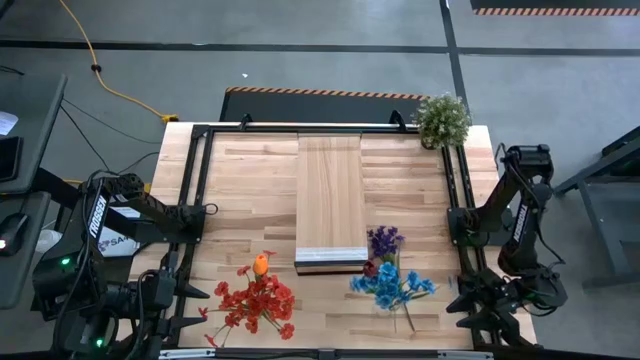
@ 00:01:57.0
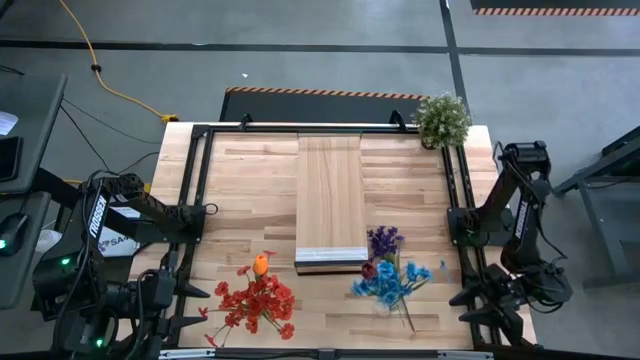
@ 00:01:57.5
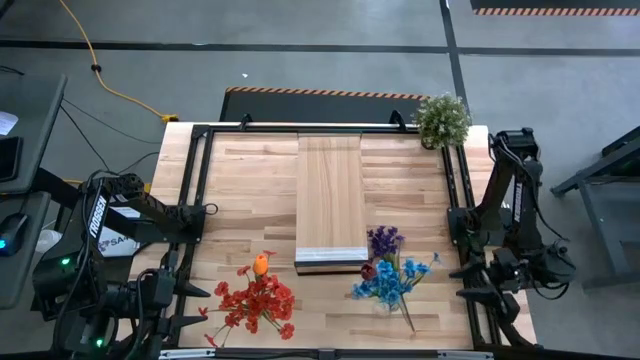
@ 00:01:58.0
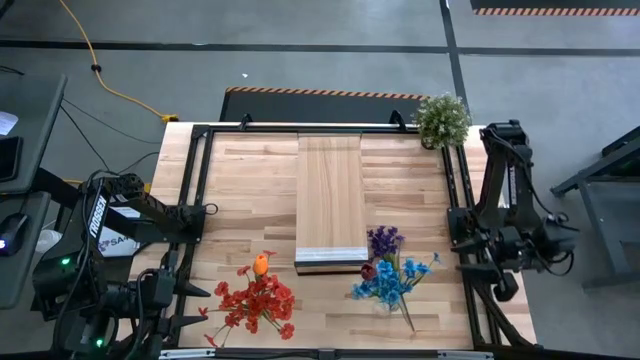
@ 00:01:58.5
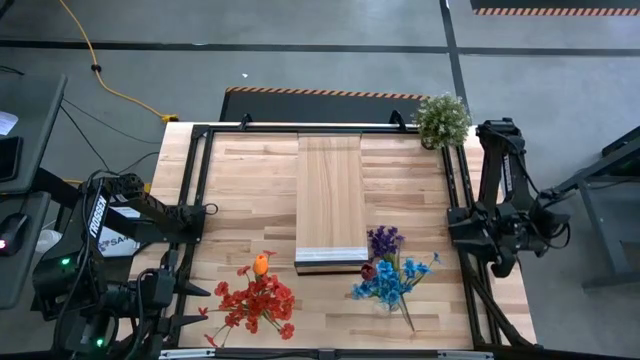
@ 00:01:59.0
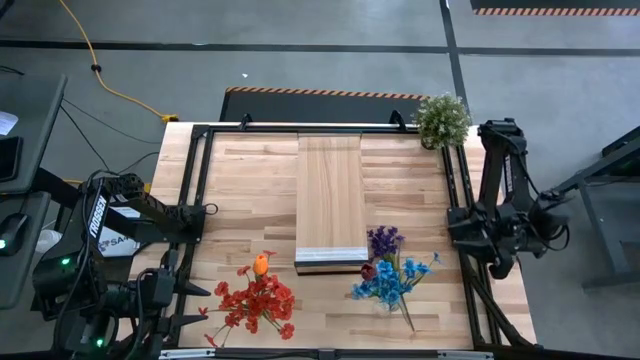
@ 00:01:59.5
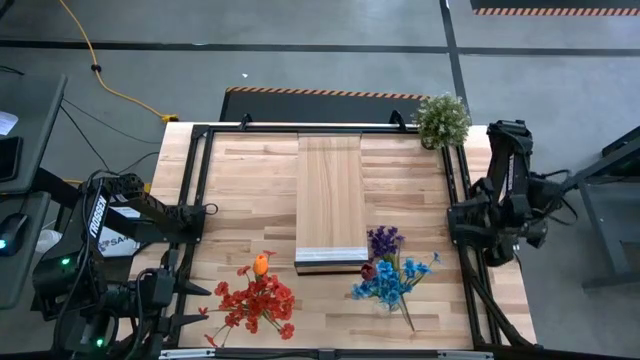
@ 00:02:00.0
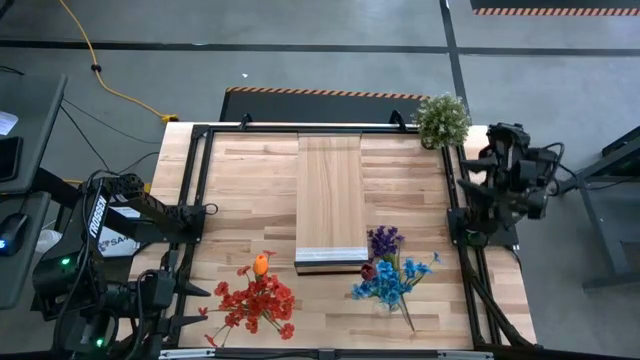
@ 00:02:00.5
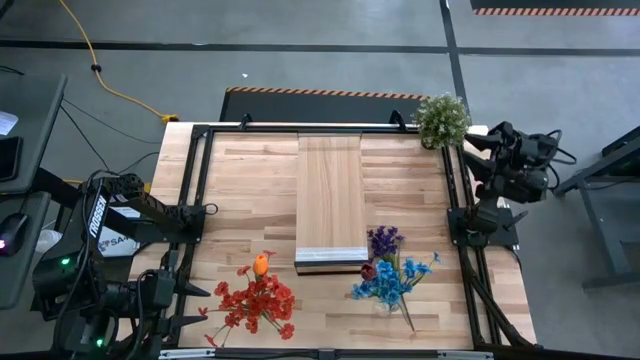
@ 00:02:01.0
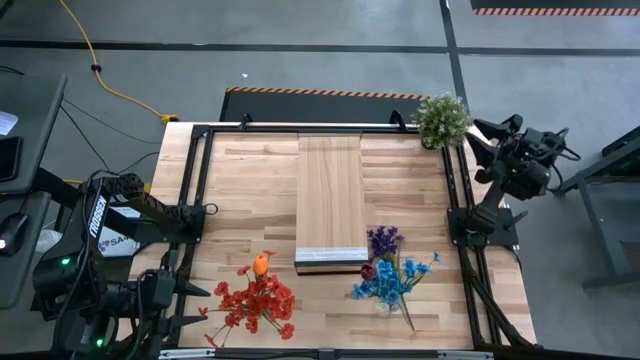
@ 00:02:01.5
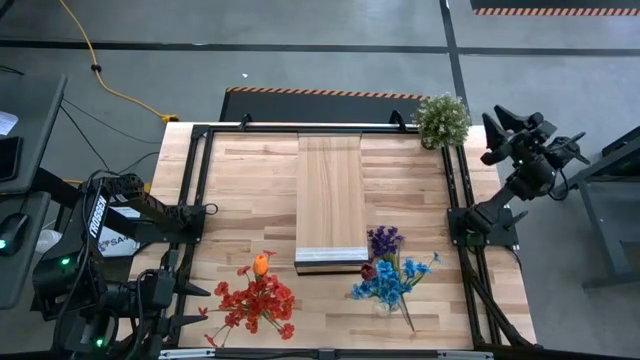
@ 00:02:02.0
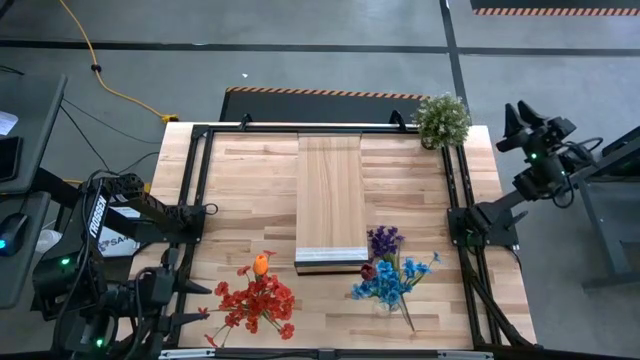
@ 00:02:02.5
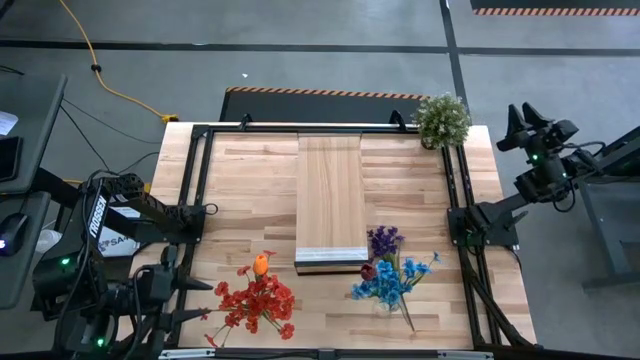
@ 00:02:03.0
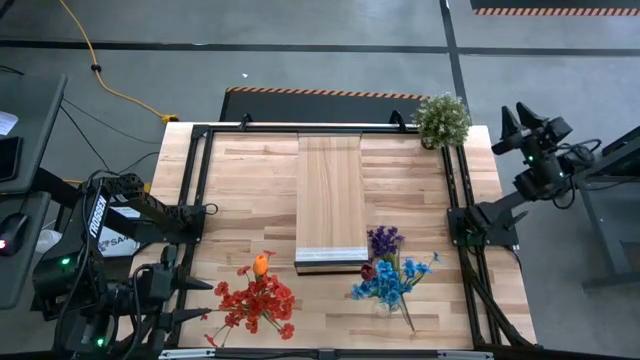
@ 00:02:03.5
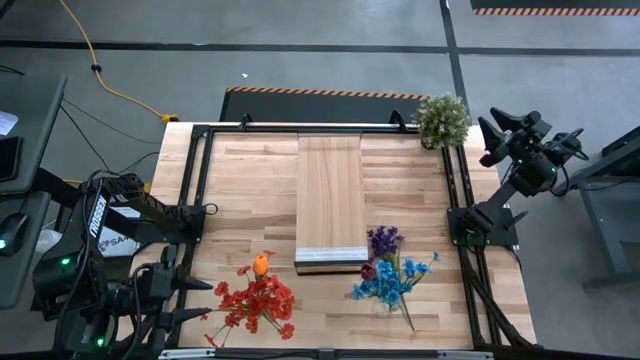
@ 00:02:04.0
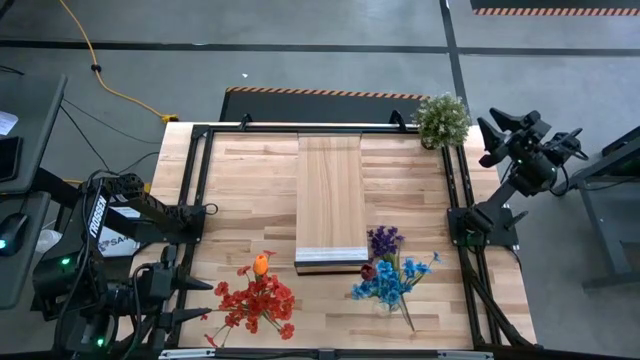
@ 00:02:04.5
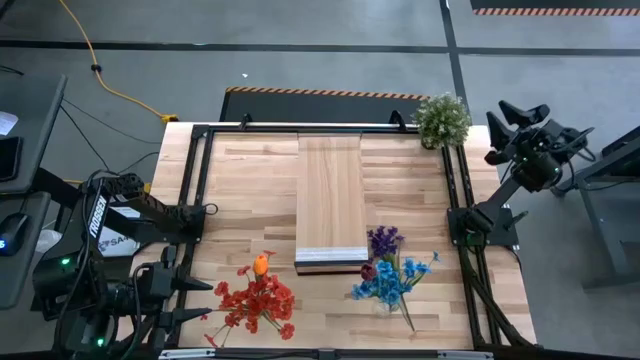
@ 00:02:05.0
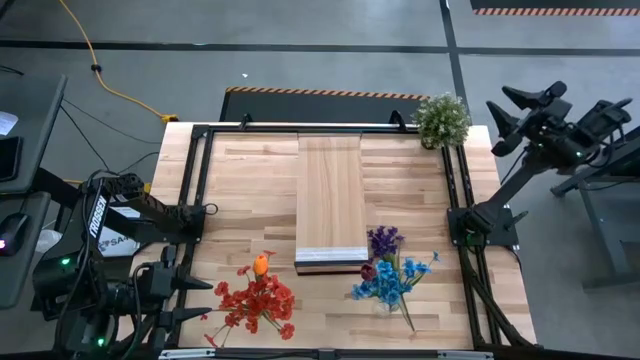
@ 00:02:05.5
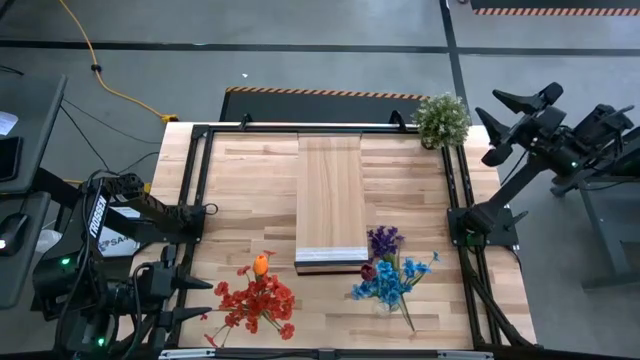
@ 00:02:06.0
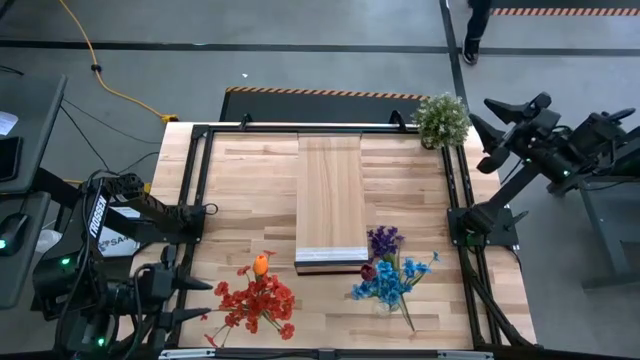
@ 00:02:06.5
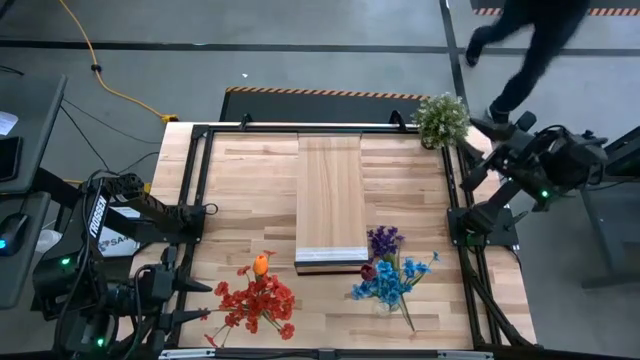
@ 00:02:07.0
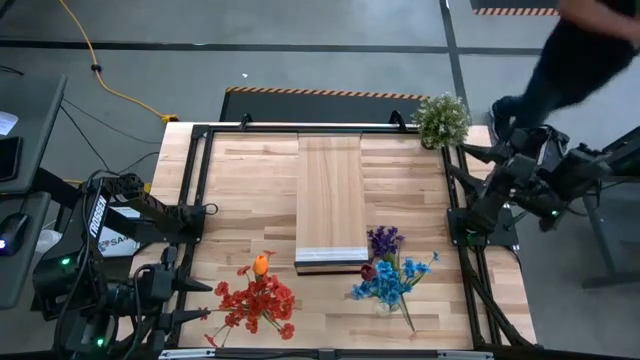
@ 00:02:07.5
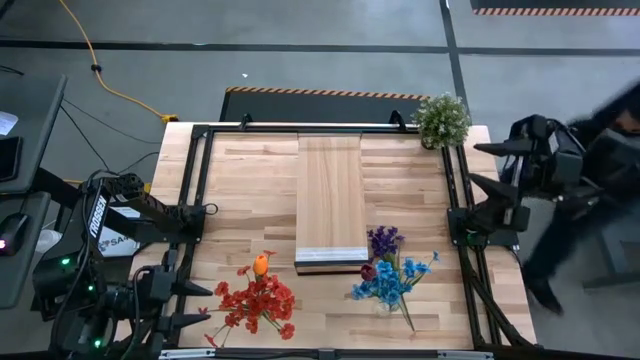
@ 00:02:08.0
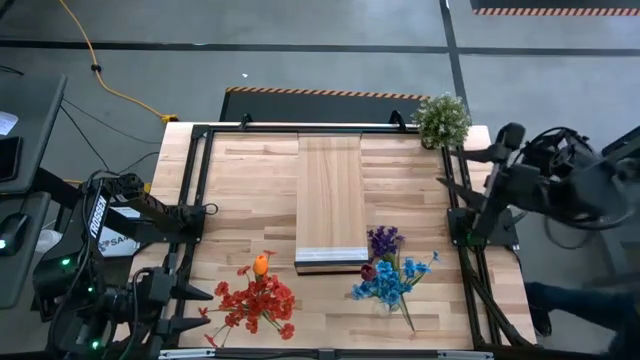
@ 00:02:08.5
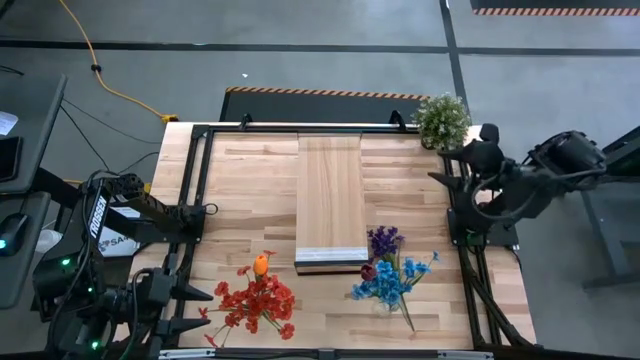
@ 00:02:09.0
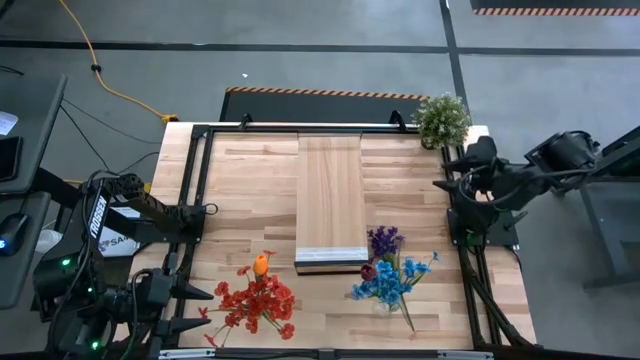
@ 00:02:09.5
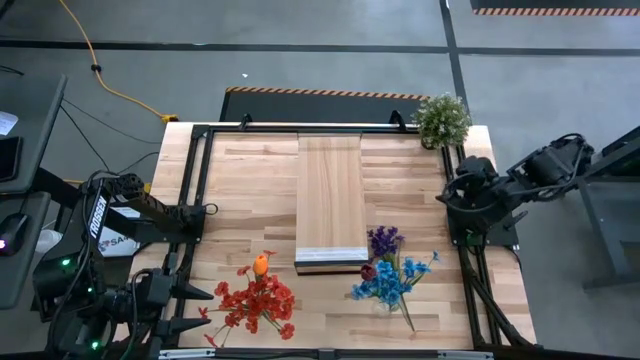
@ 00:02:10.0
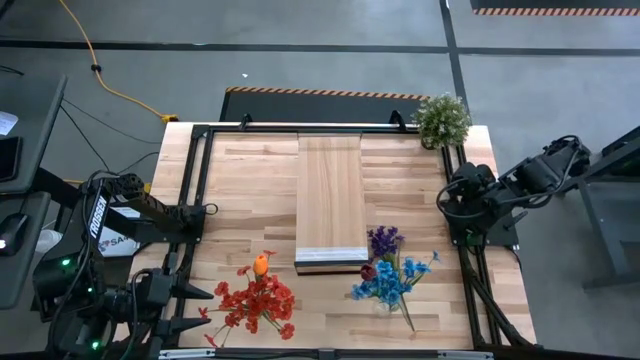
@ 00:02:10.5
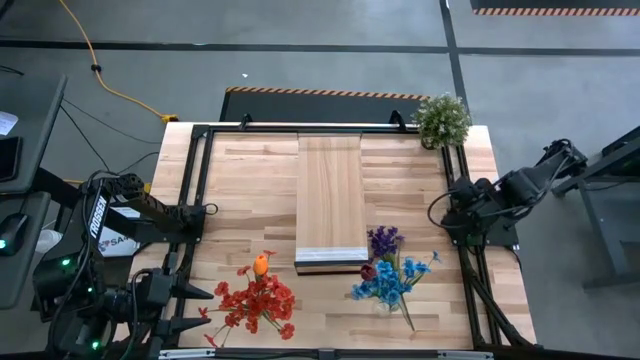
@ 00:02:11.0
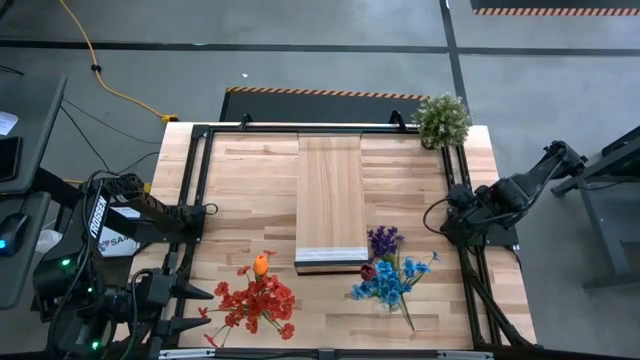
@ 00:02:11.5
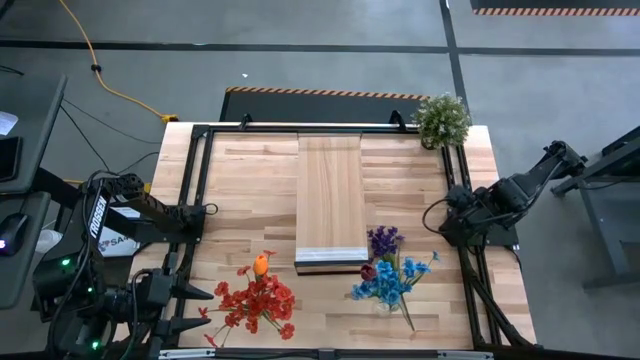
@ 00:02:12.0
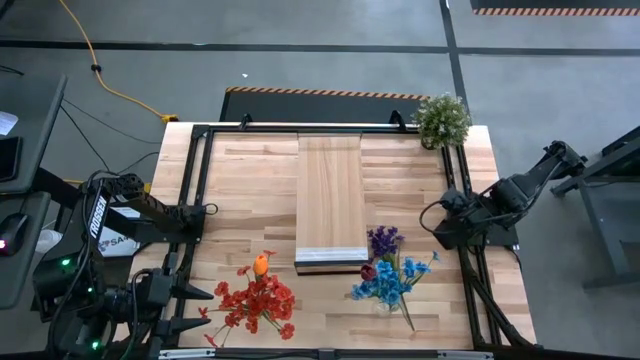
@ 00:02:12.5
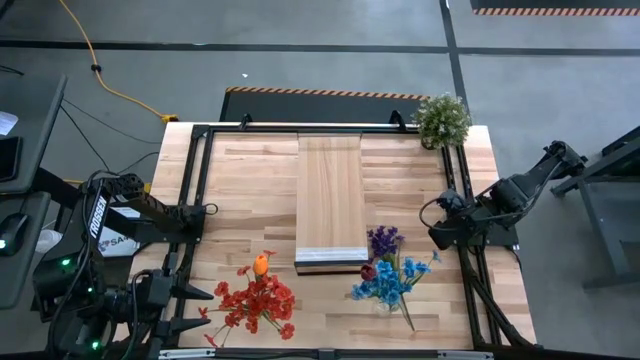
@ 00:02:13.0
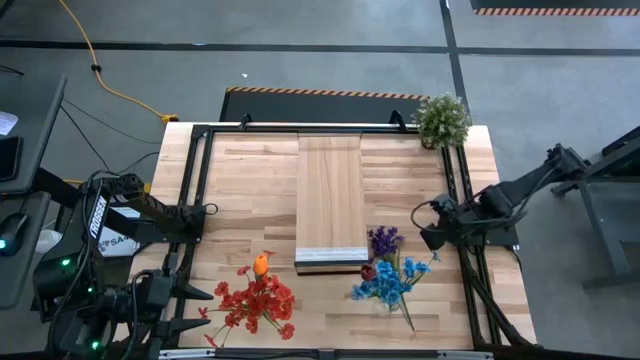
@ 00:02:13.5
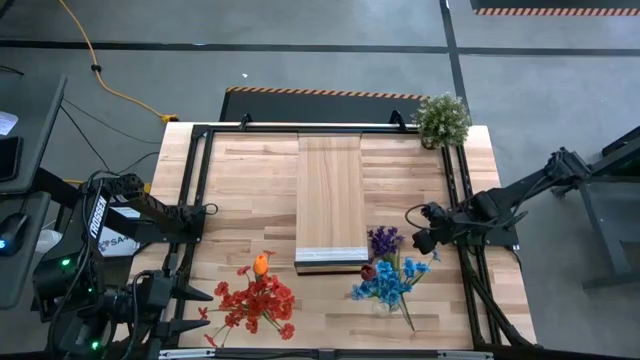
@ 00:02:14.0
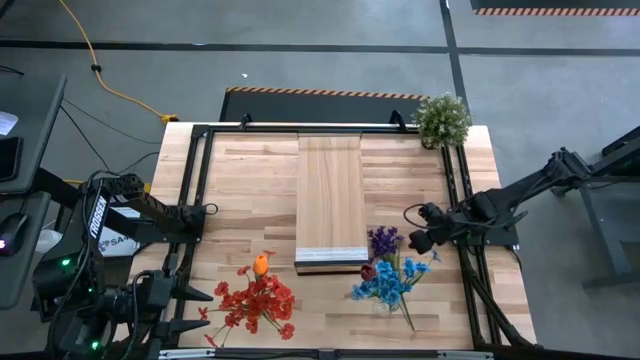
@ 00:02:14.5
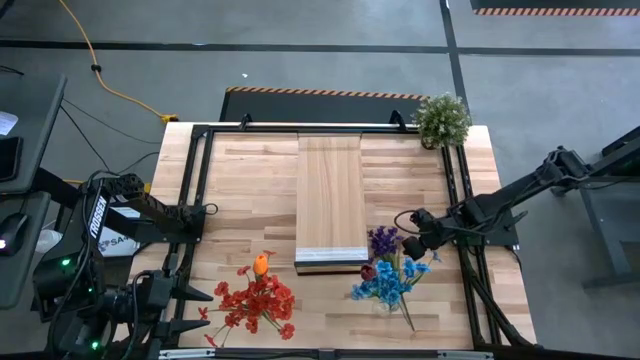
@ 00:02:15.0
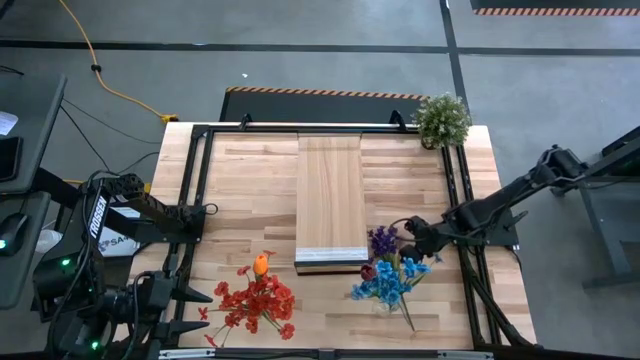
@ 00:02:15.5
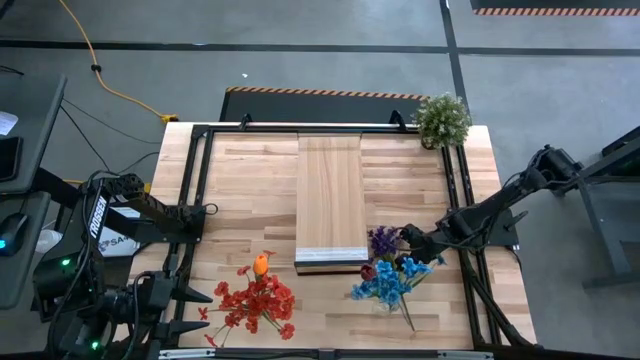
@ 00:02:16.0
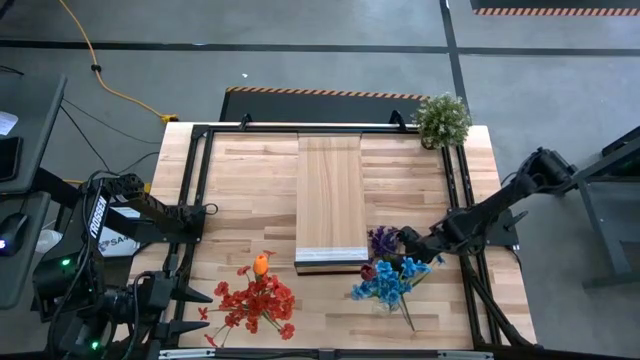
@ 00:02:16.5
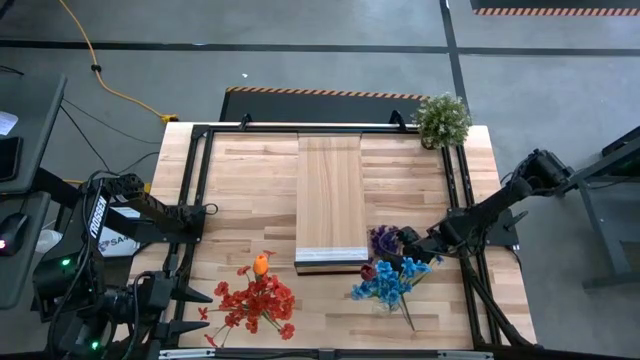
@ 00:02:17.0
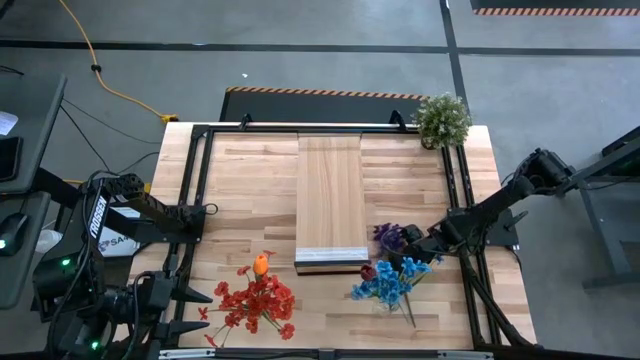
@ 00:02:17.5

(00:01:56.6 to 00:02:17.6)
Task: Pick and place flowers into a vace then onto a shelf
Put the violet flowers into the right transparent vase

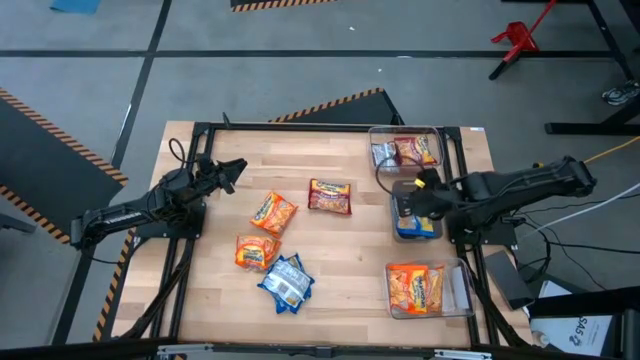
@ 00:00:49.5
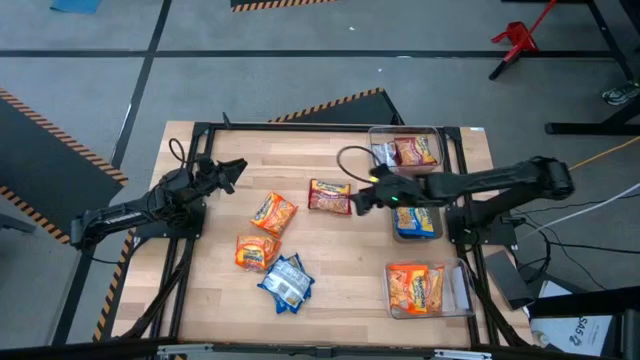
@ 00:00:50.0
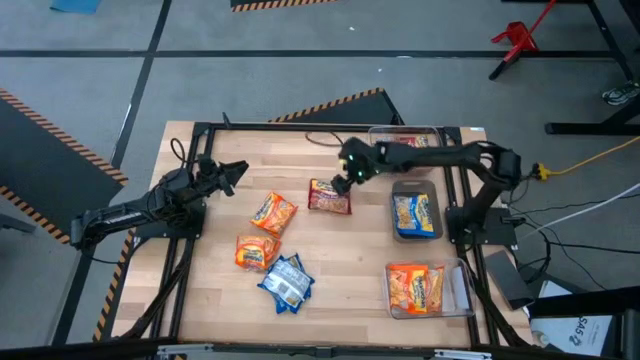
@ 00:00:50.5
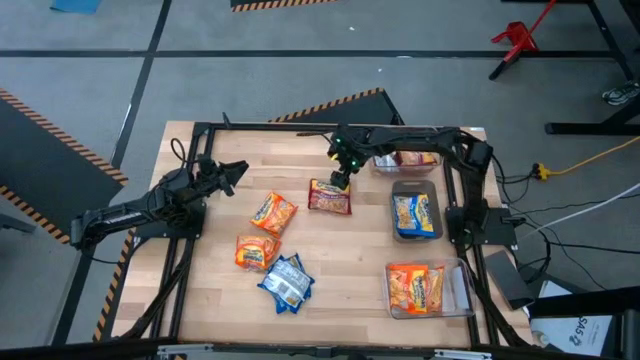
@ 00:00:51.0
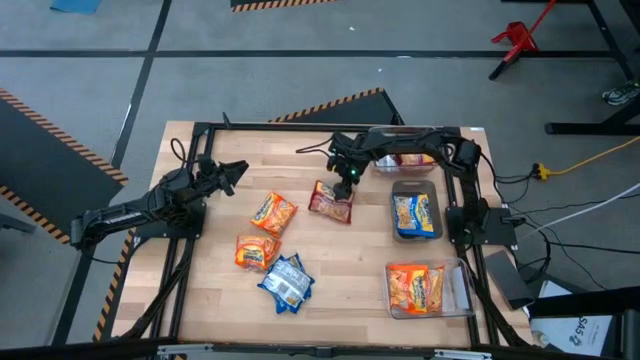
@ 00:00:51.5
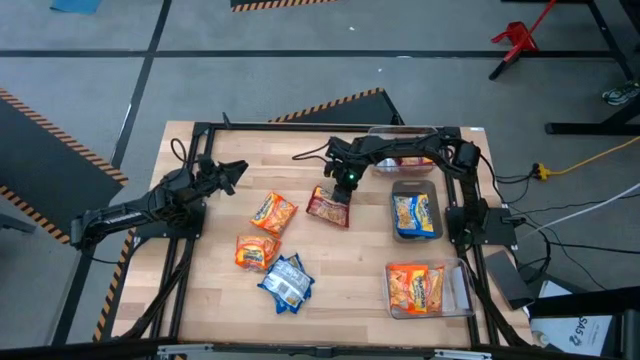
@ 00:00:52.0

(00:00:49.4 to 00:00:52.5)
Task: Sort Maruchan noodles
Put the red noodle pack into the top transparent bin
